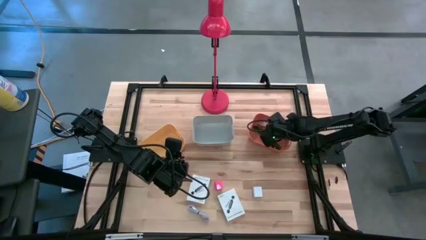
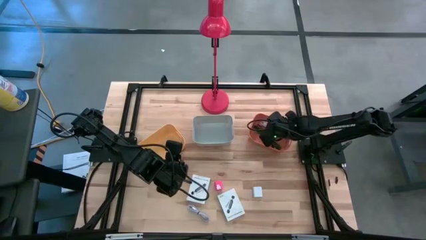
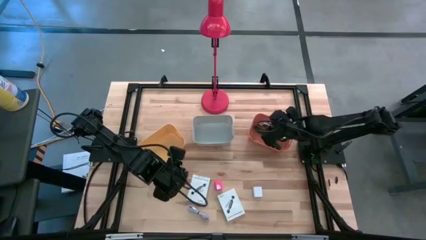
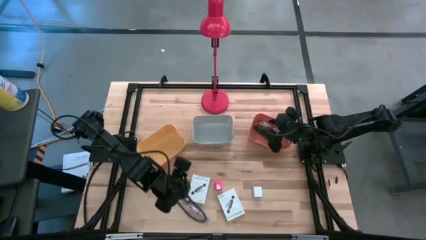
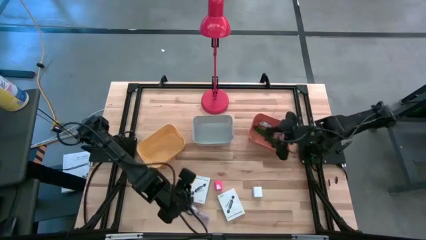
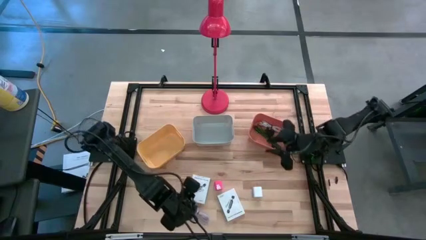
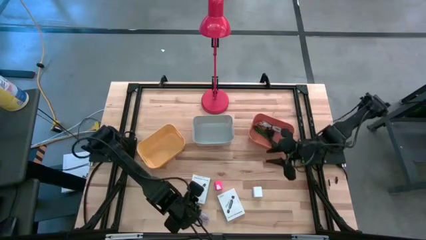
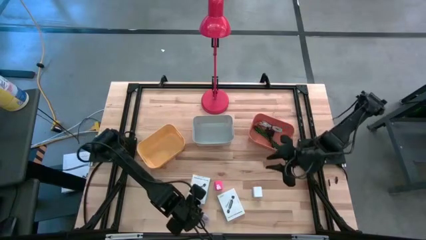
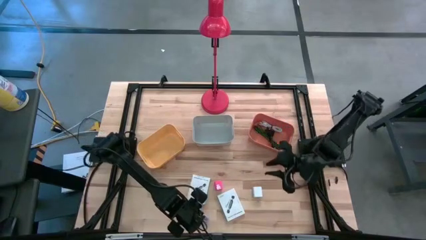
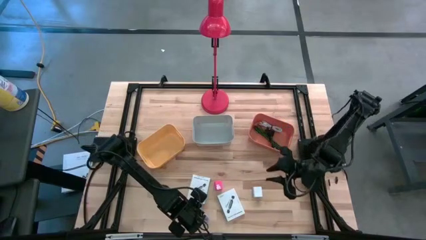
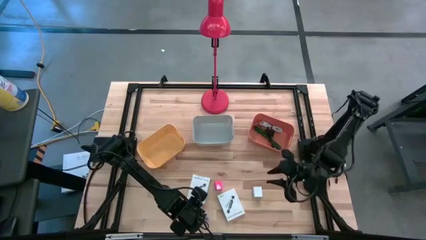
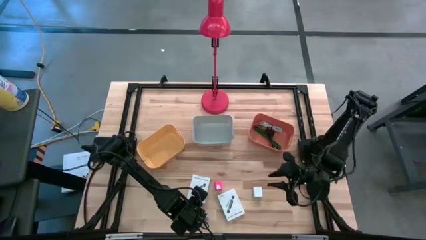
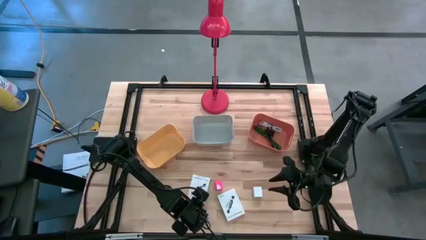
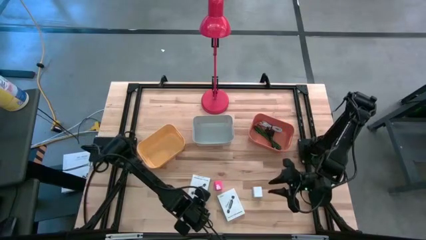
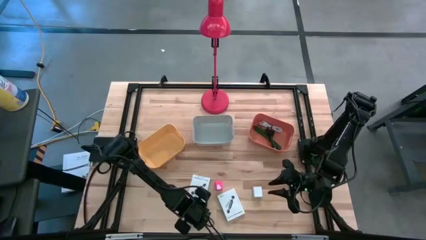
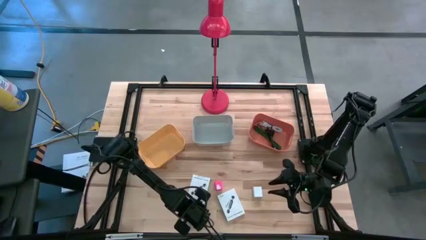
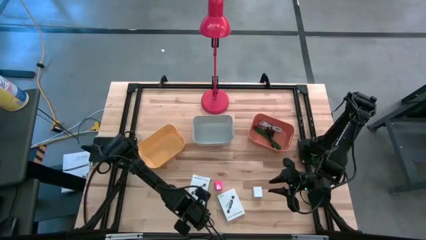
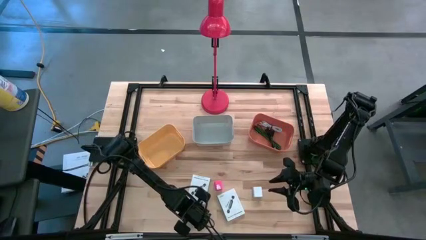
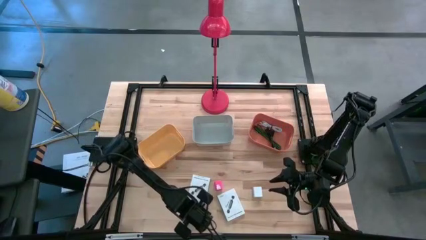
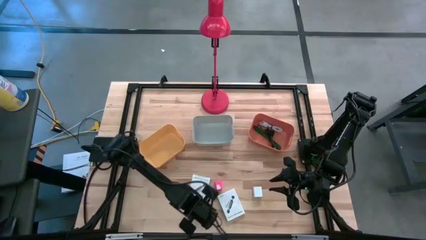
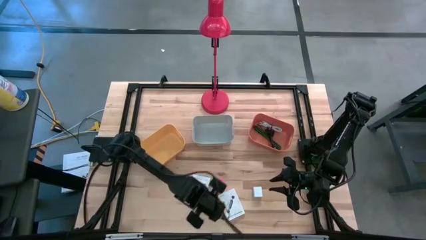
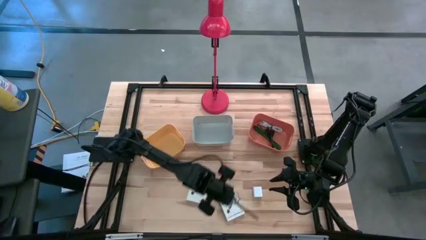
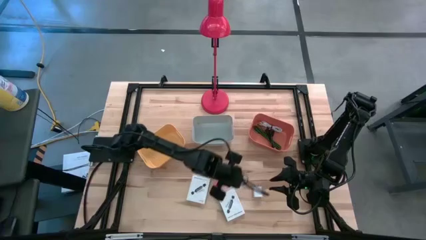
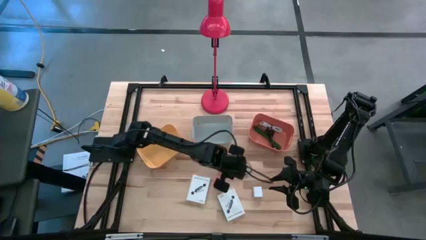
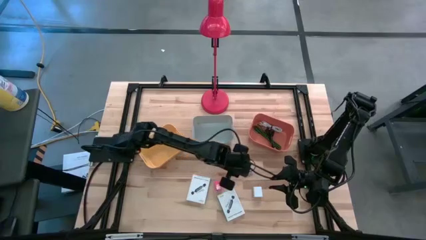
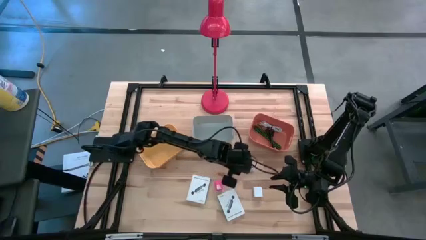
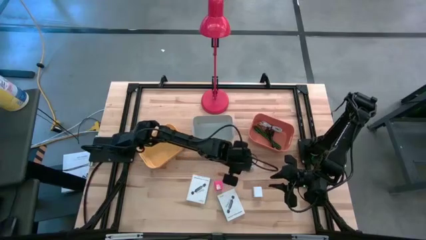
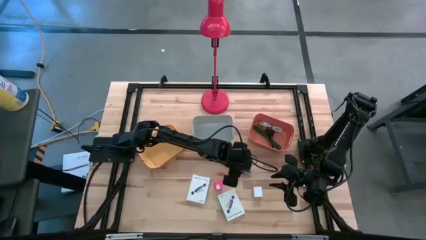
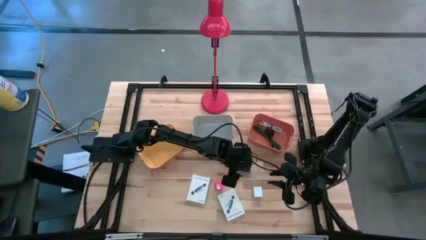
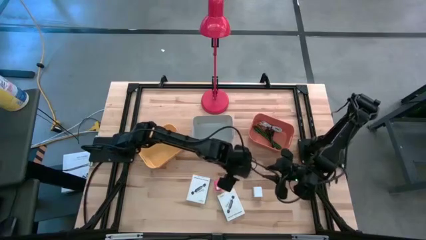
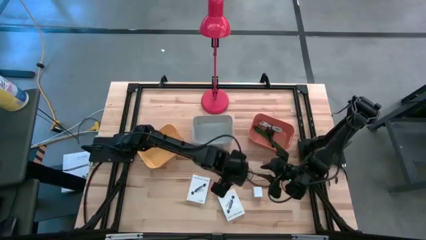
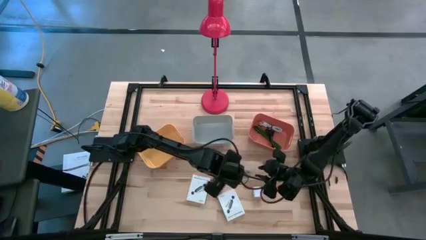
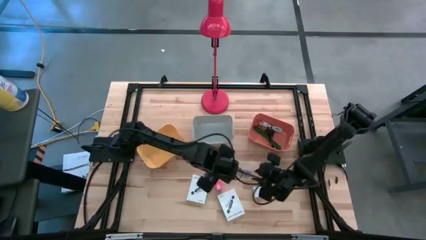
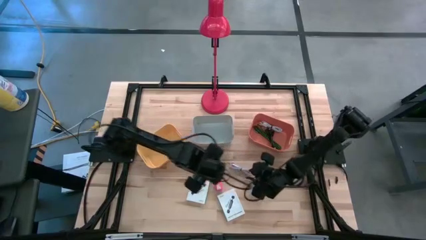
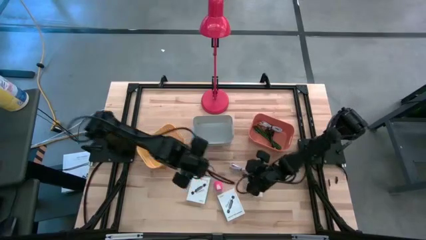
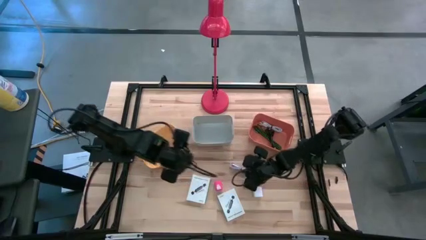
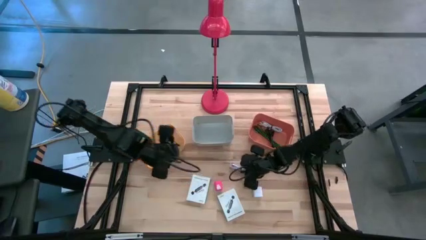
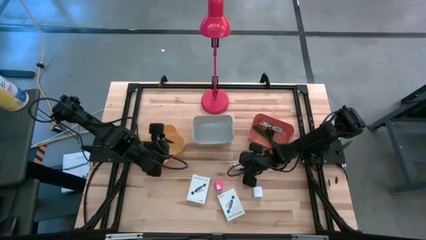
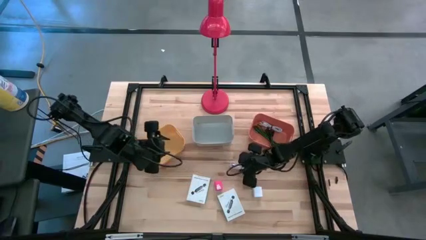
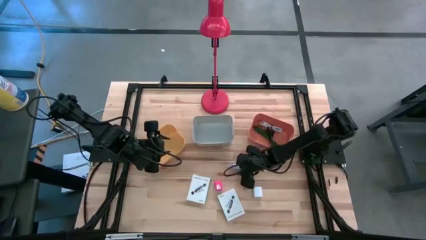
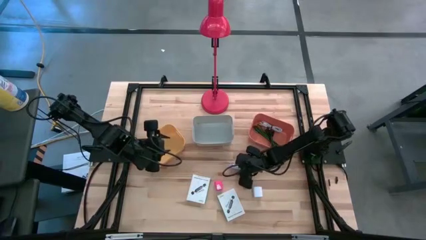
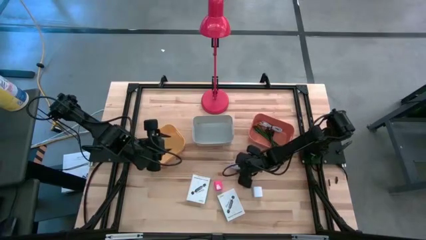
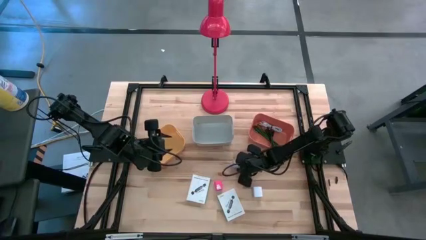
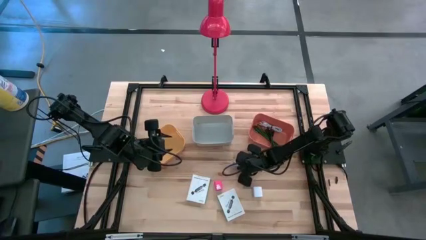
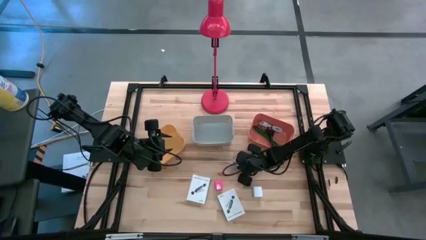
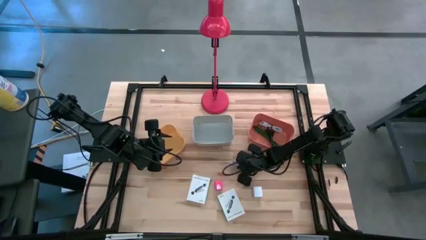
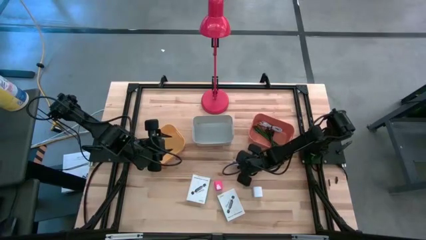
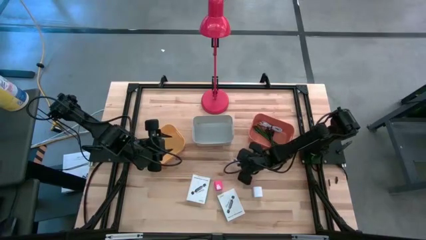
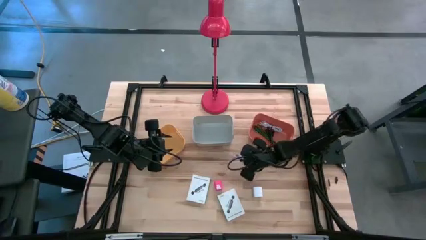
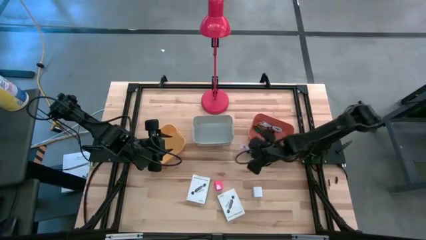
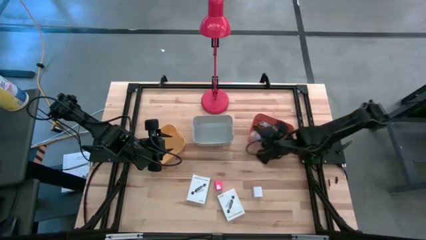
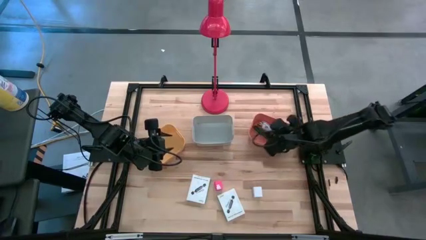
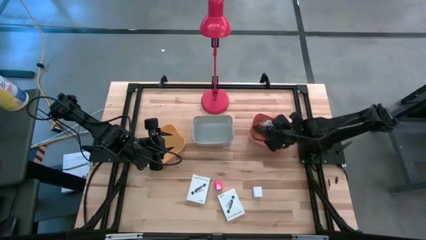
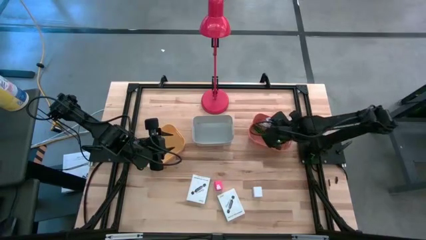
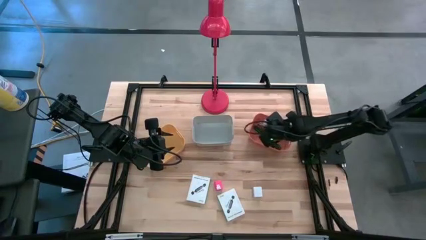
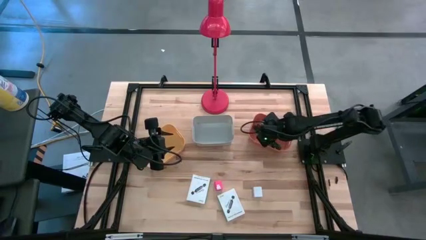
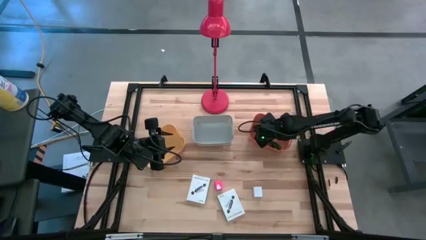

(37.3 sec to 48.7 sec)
Task: Pick and place items into bin
Put the purple charger cable into the orange bin

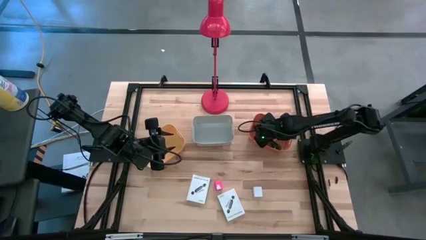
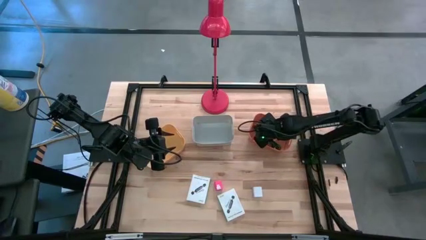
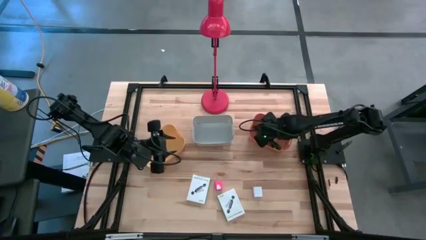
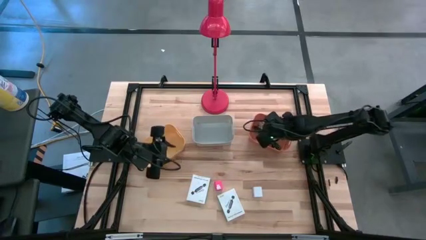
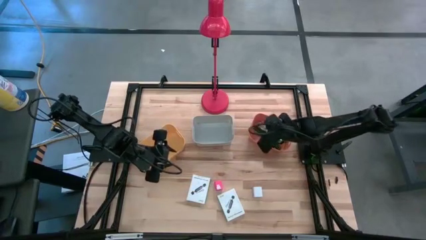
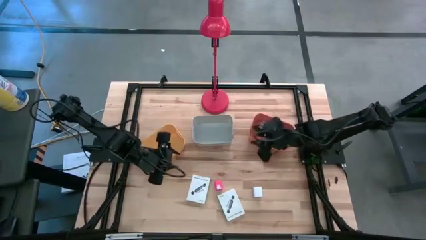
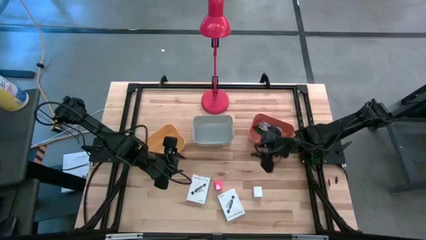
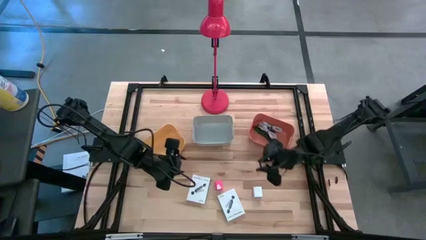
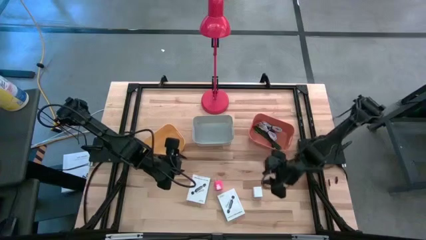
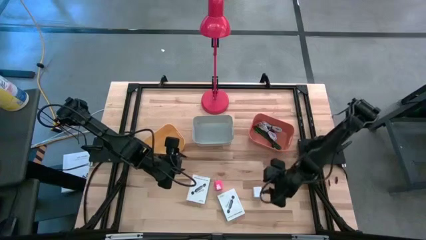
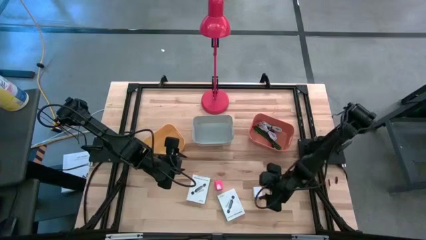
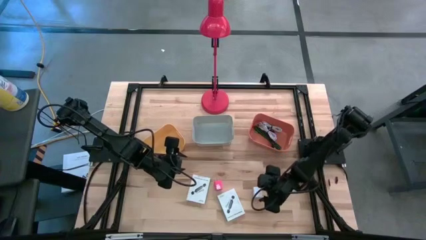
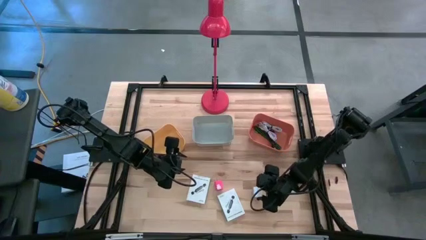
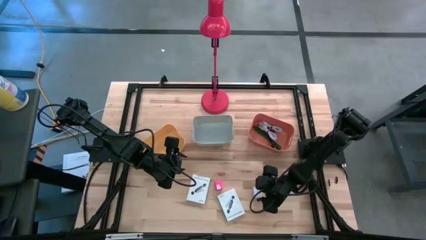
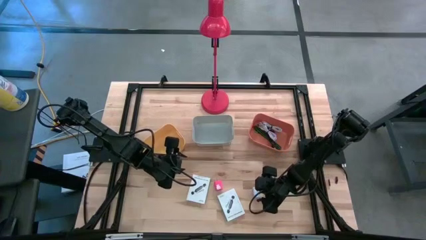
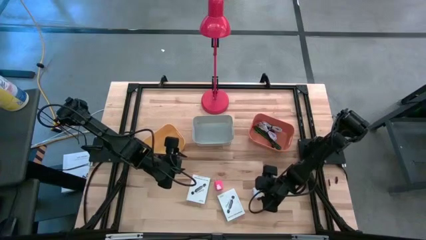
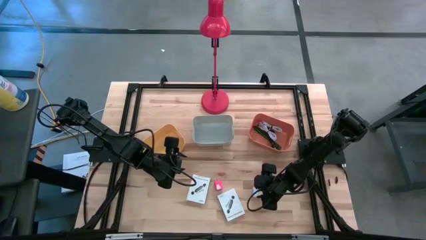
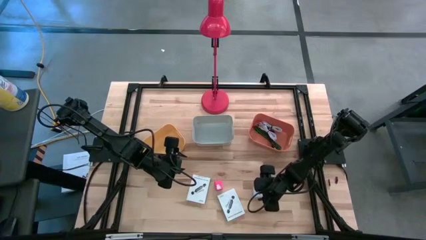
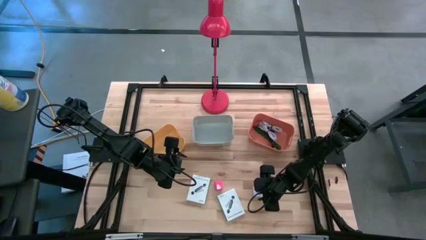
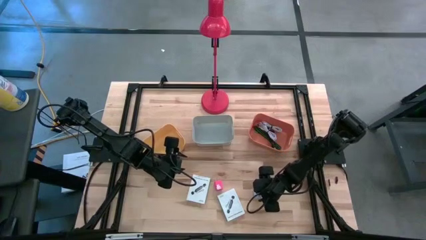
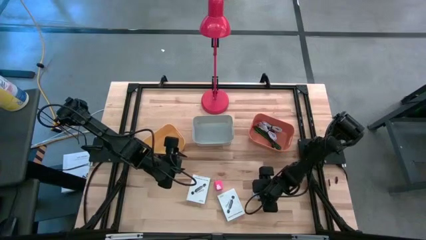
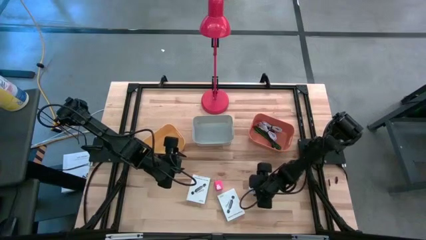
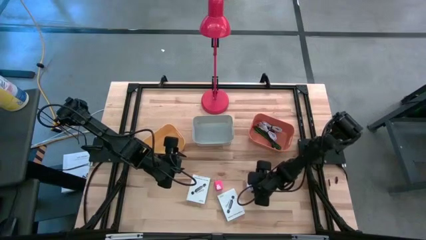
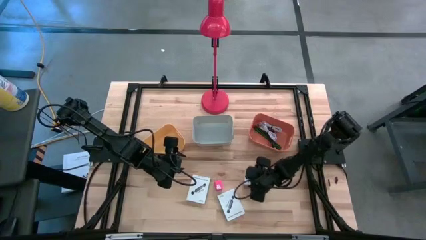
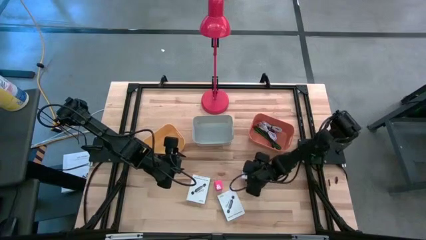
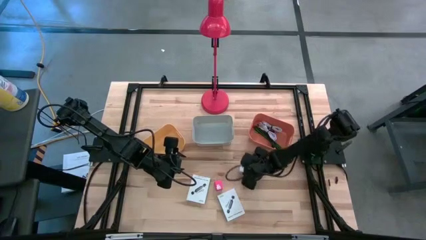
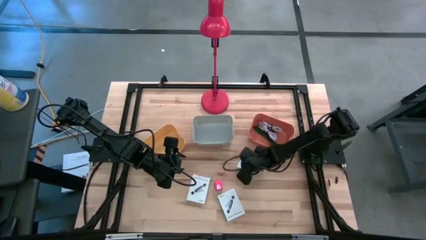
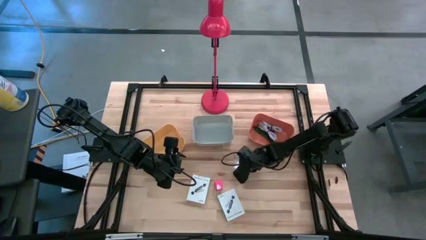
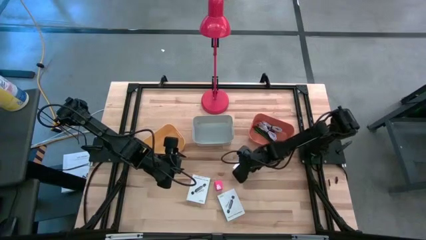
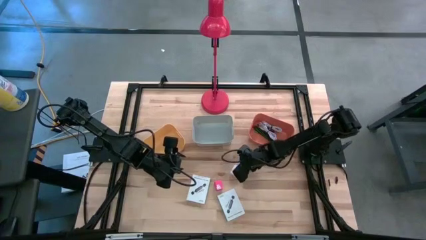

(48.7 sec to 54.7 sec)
Put the white charger adapter into the gray bin
